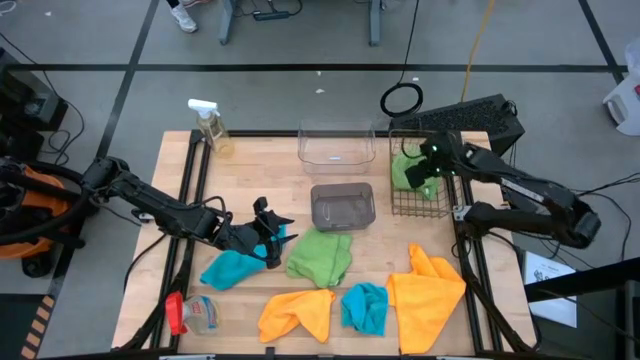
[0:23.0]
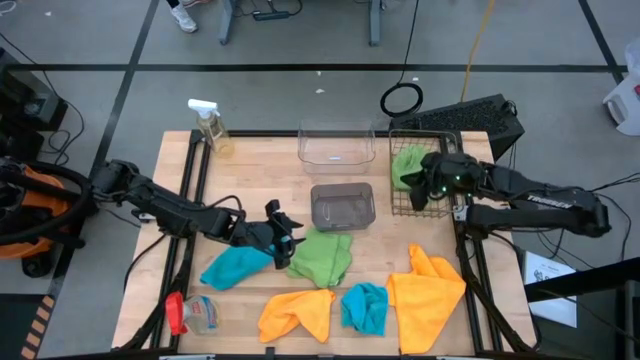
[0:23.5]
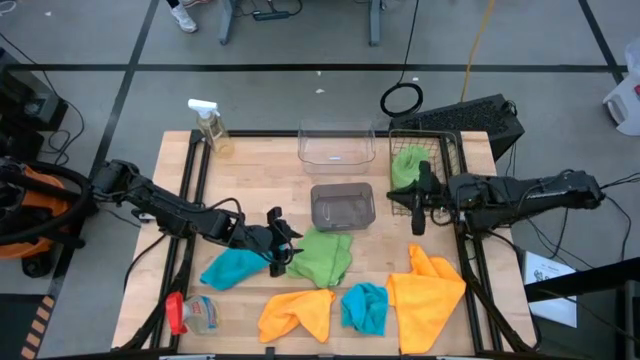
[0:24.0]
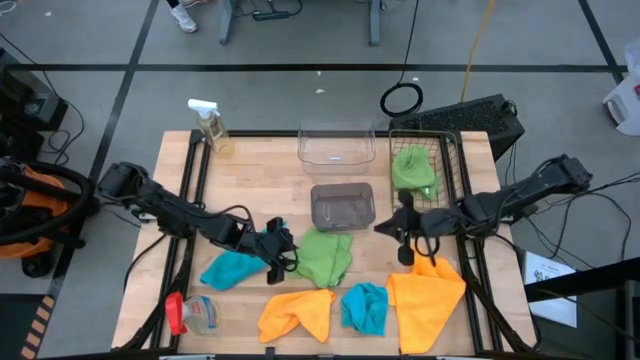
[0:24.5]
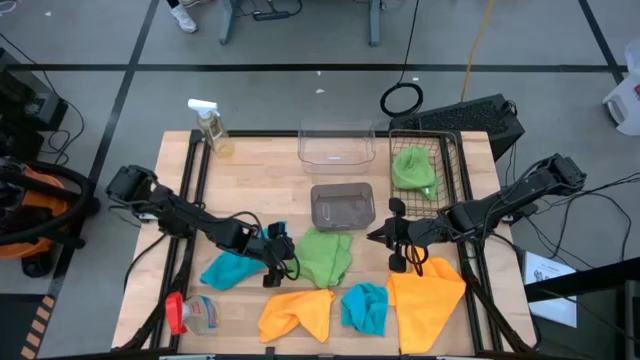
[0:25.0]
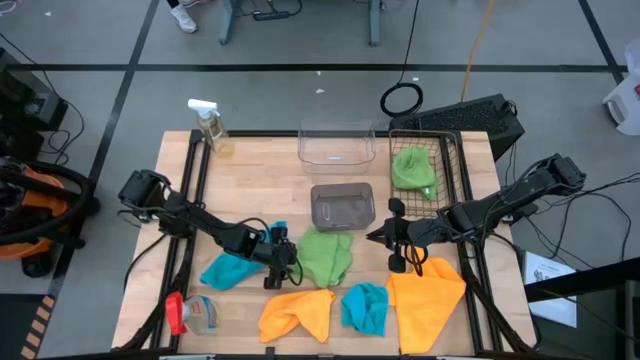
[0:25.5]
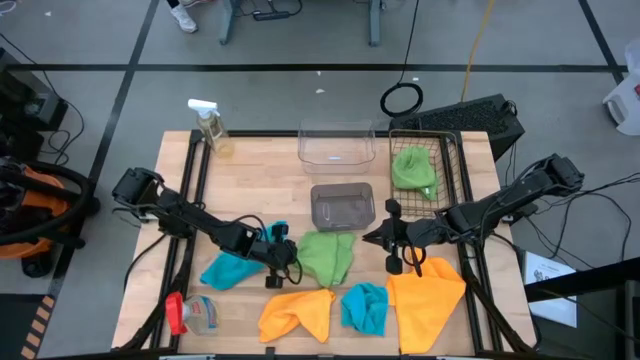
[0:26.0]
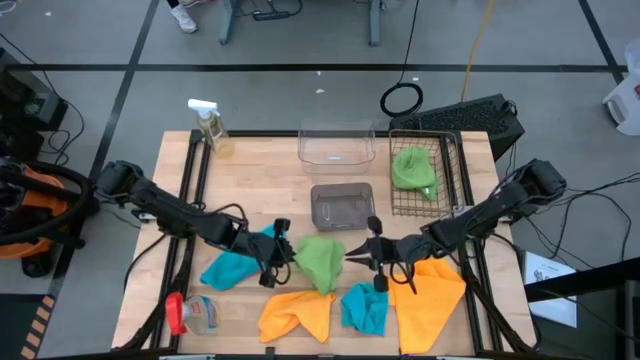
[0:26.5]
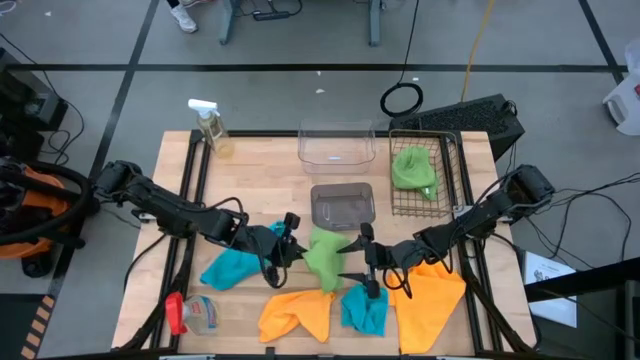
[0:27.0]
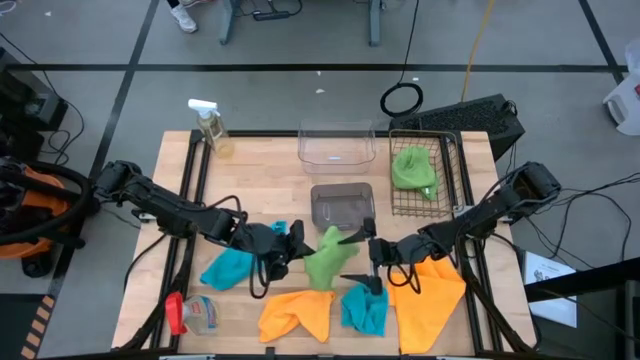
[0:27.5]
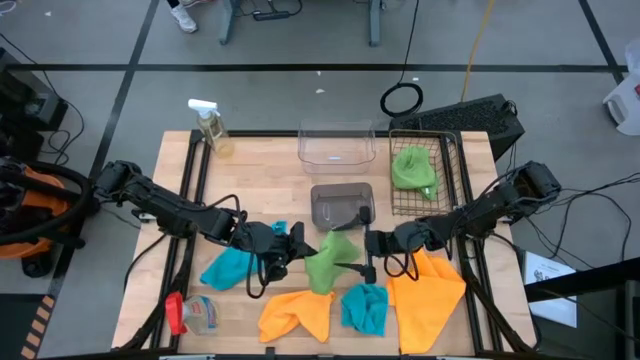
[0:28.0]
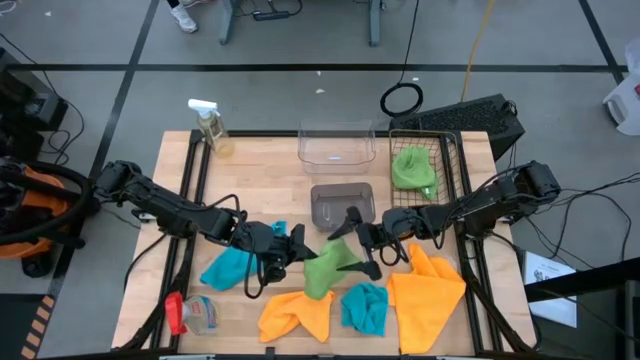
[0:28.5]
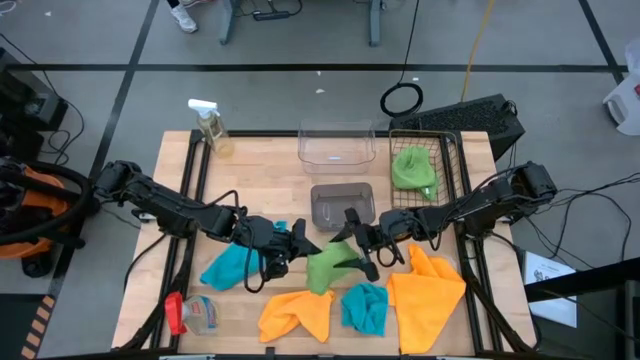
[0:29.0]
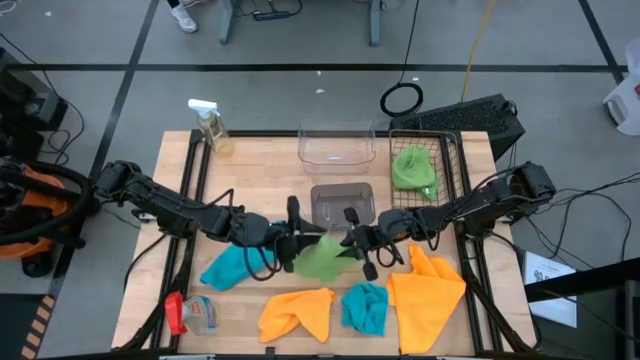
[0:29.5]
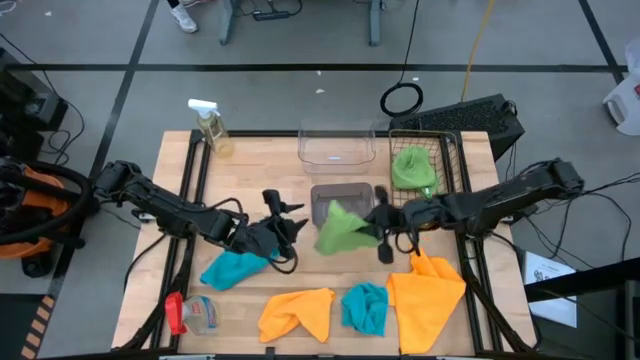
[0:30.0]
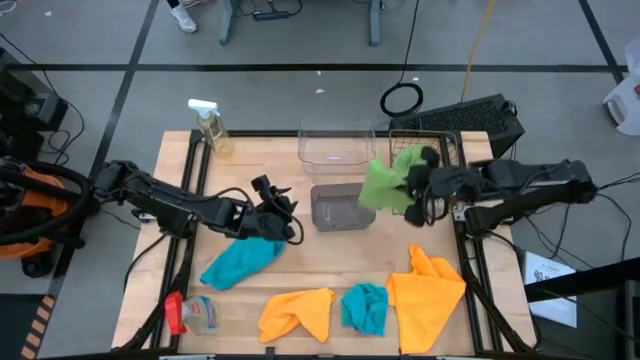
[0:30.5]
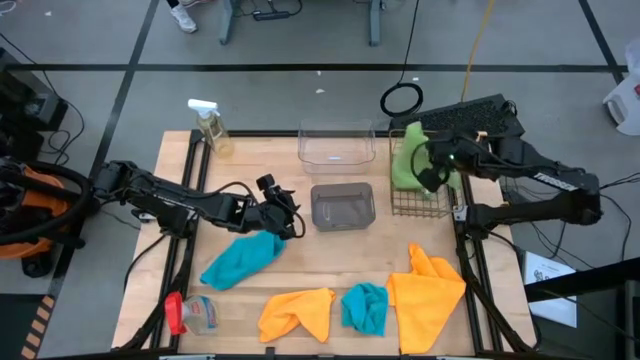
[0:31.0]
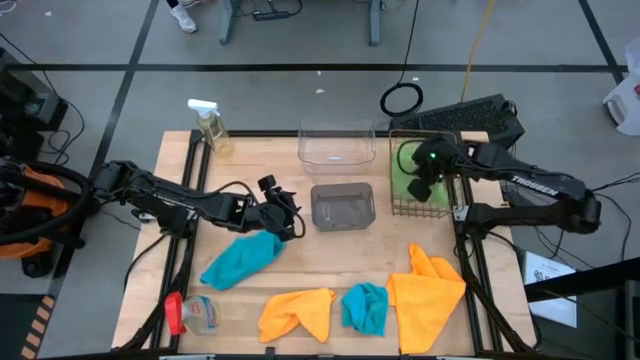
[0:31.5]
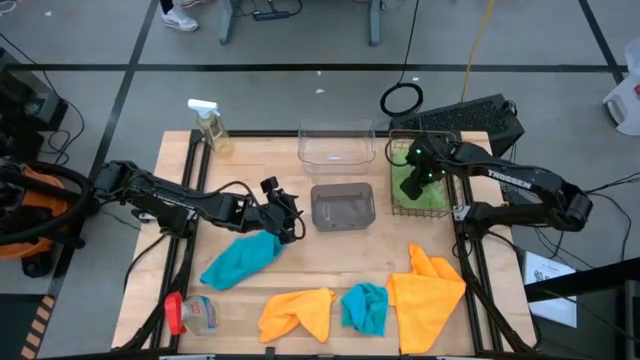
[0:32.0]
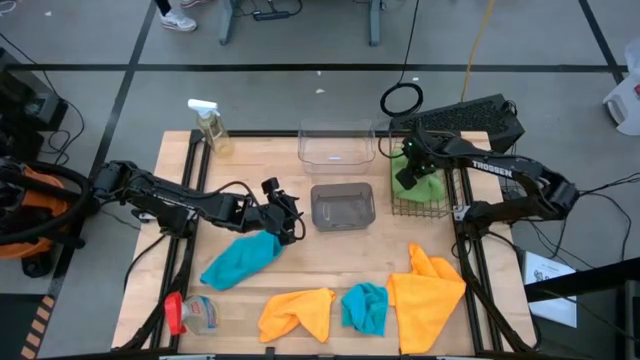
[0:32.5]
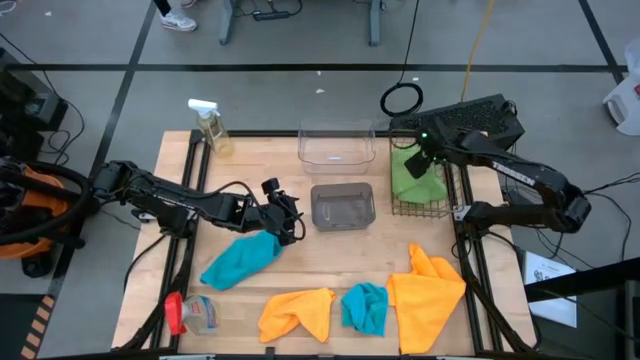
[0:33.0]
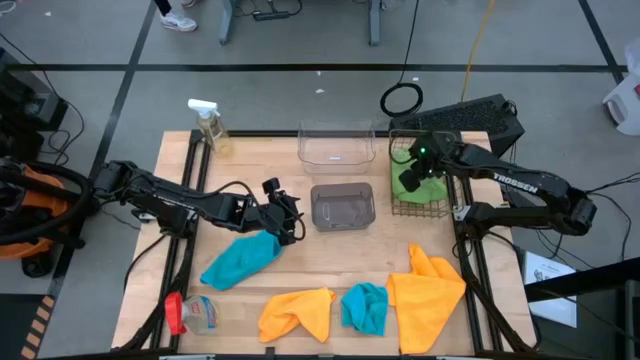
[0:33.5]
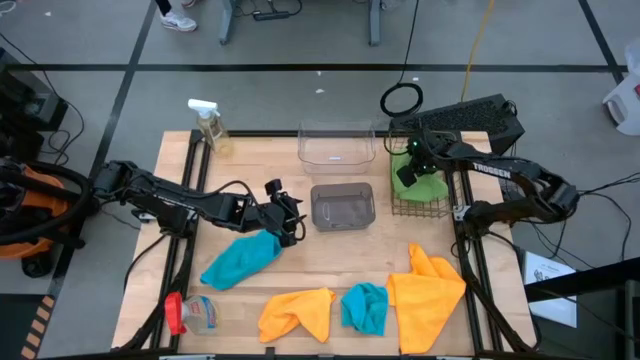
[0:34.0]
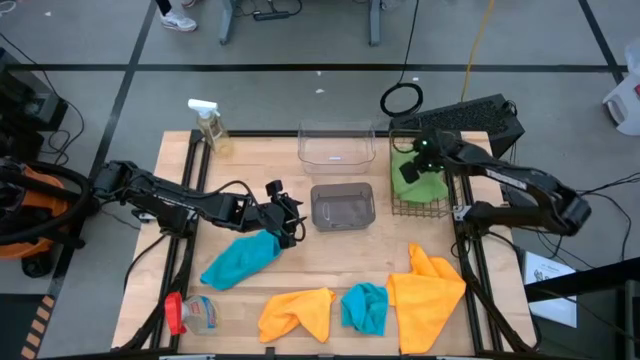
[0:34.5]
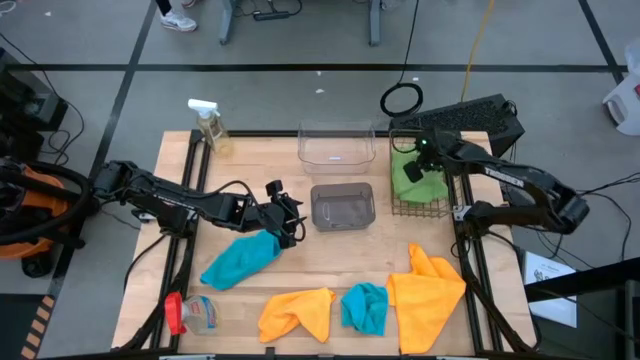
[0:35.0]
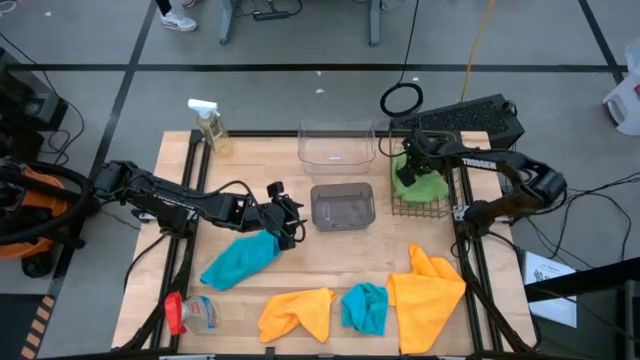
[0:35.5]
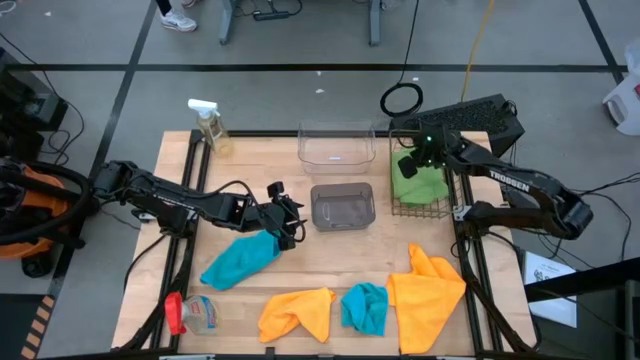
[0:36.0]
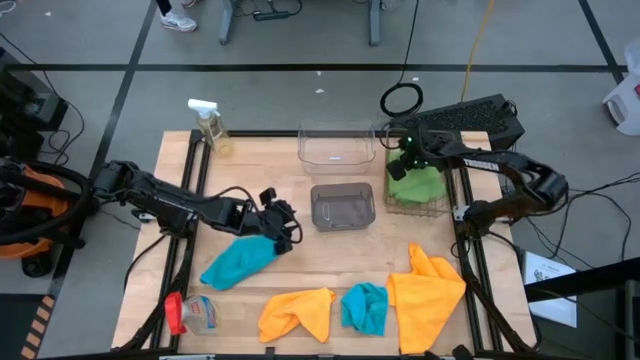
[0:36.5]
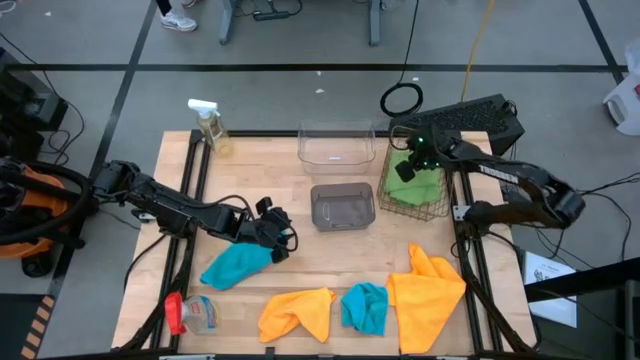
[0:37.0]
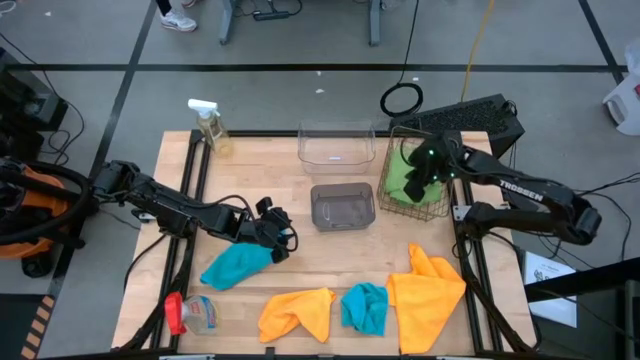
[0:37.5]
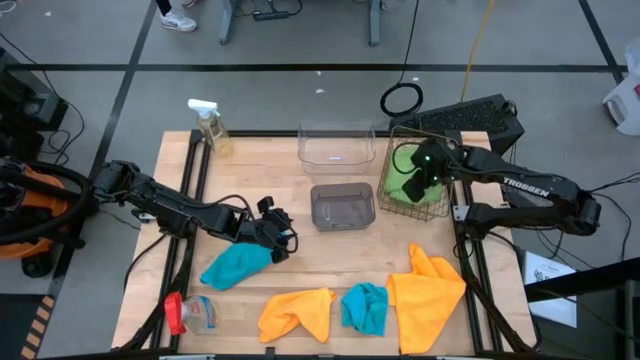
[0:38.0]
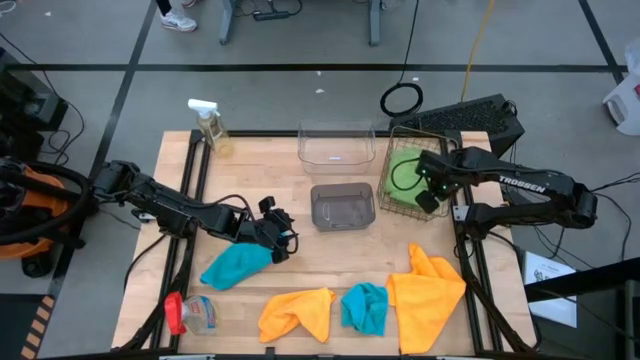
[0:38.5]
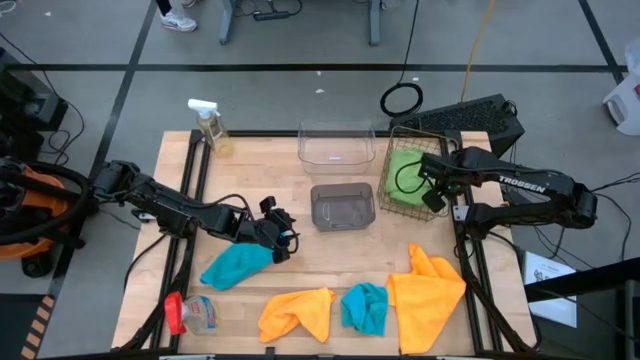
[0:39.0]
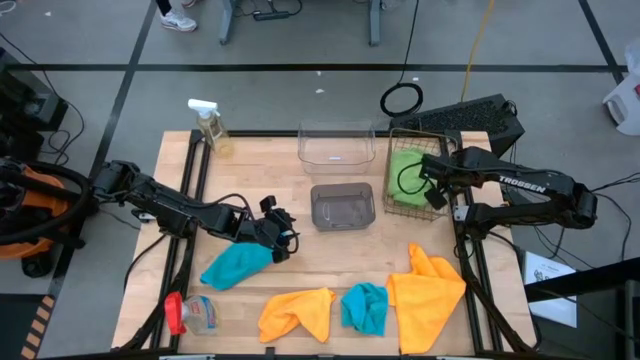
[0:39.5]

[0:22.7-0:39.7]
Task: Sort microfiber towel by color & place in baskets
Put the green microfiber towel into the wire basket

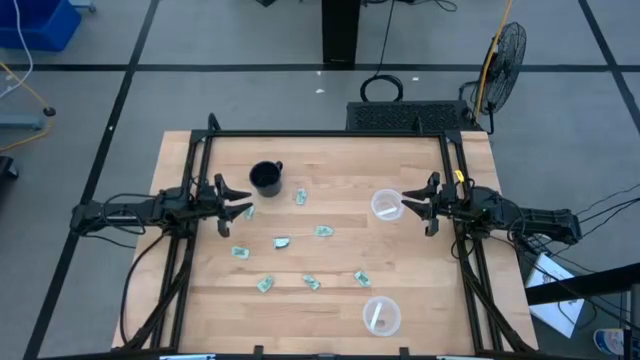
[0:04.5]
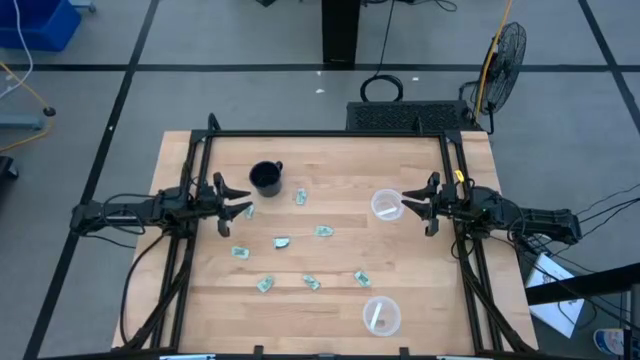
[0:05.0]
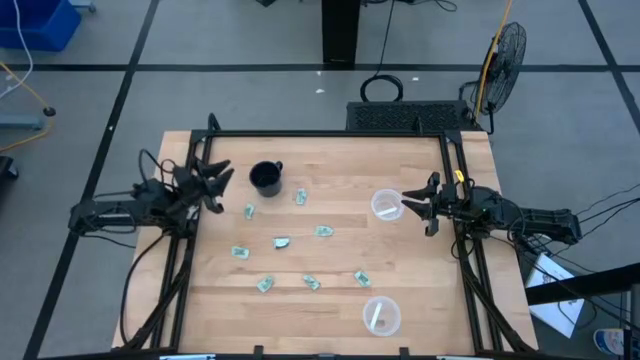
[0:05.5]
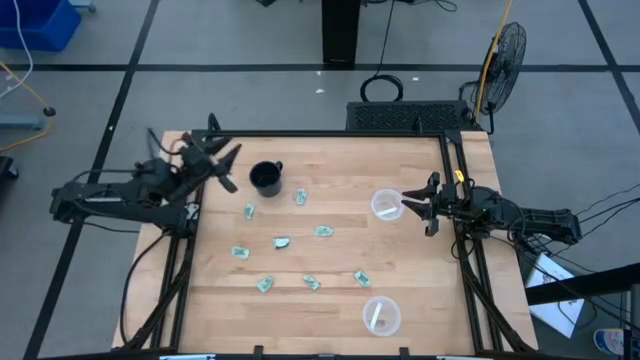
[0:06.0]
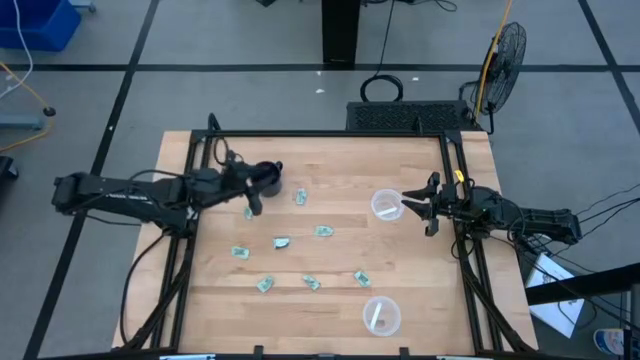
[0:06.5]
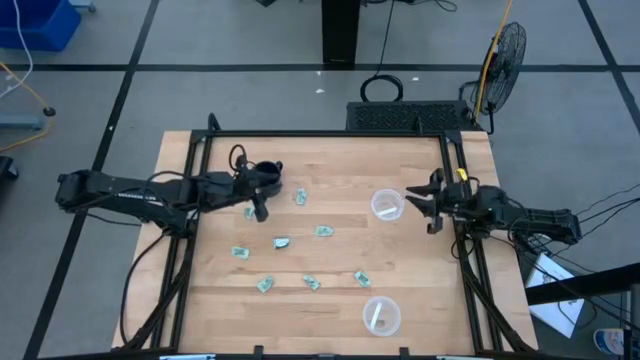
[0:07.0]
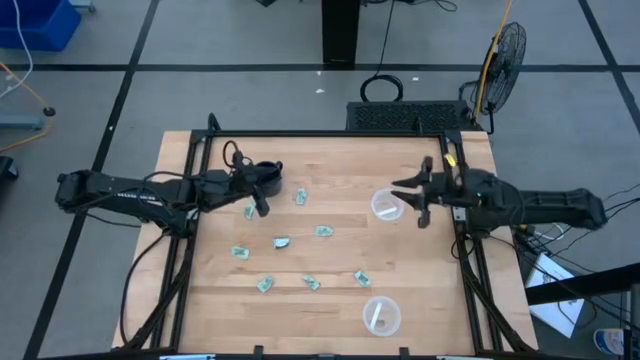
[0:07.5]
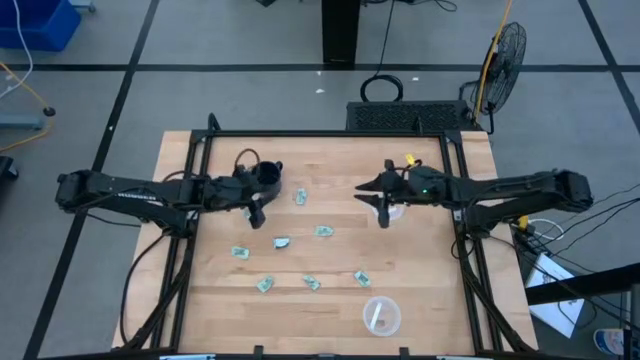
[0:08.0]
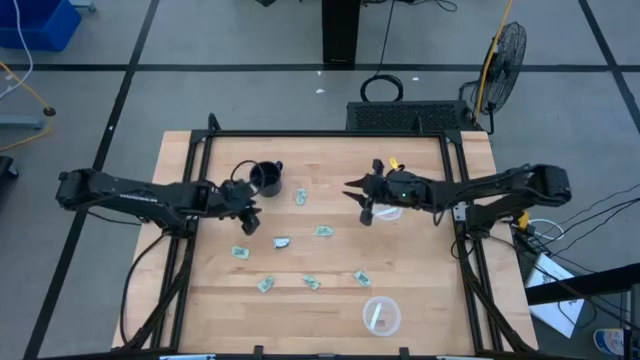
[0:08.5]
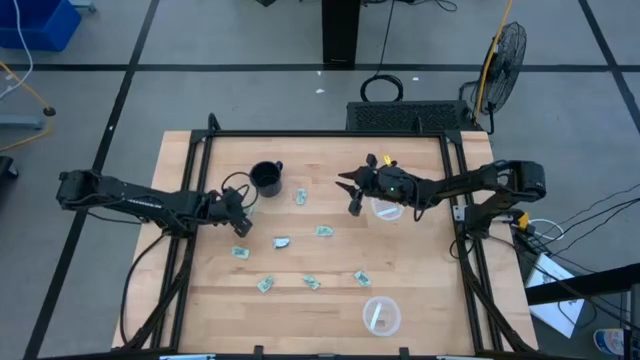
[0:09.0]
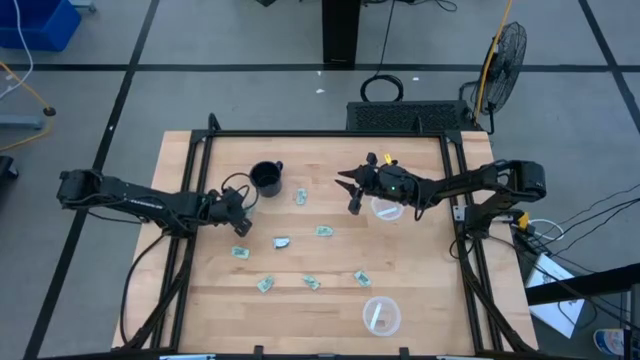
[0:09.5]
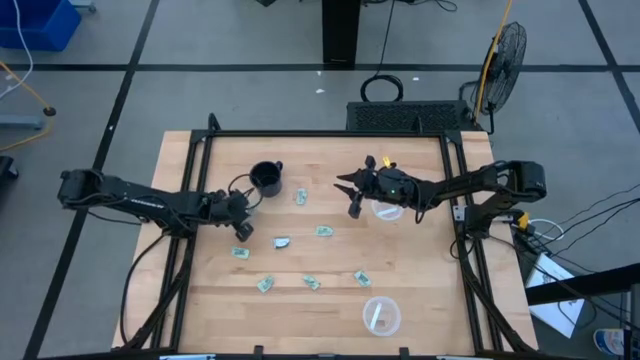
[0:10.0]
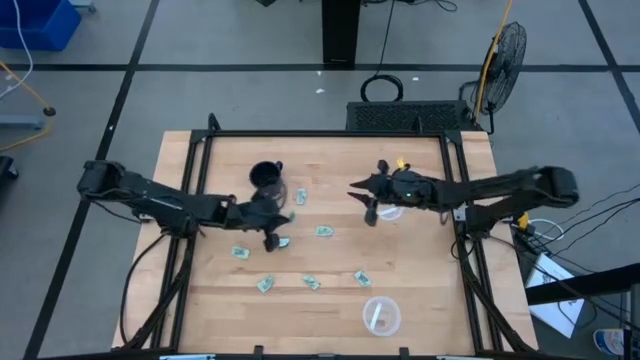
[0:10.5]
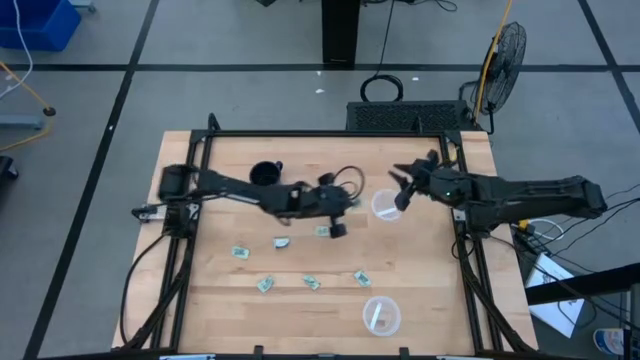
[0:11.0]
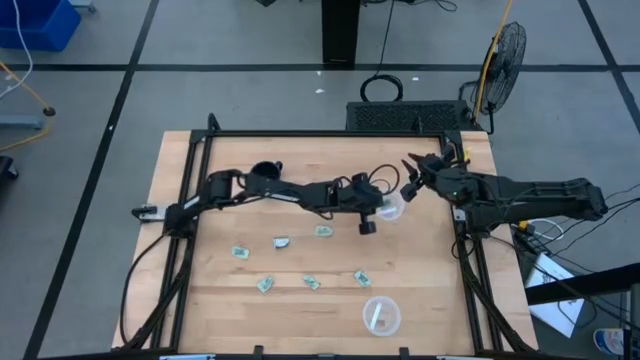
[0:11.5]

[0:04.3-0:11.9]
Task: Pick and place Stevia / Truvia into bins
Put the light green stevia packet into the top transparent container
